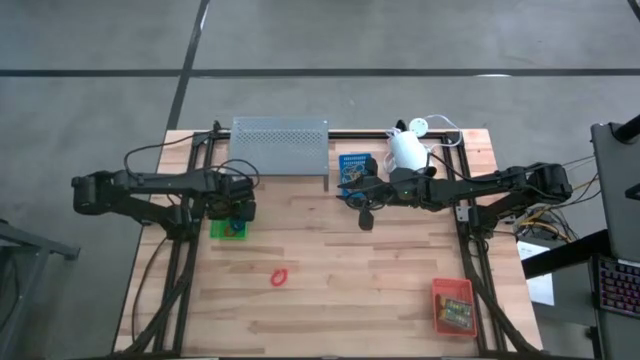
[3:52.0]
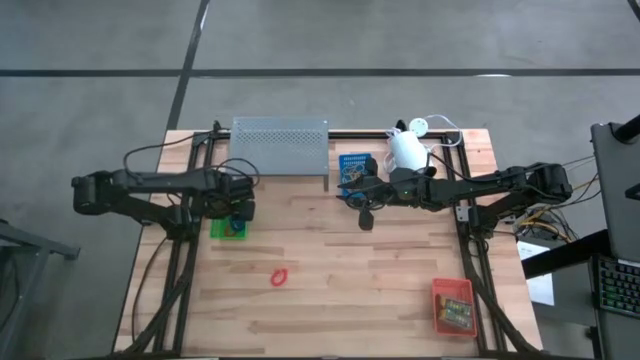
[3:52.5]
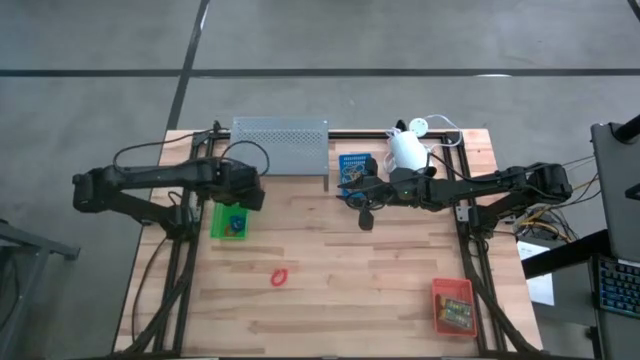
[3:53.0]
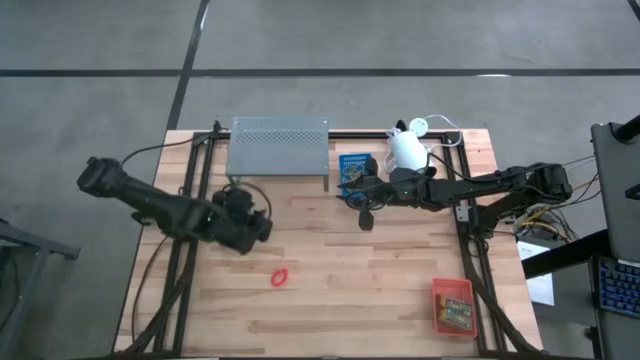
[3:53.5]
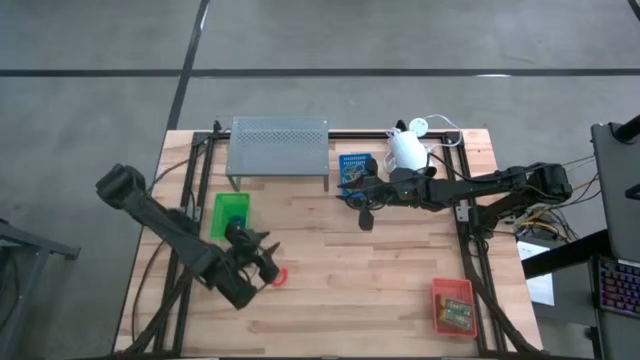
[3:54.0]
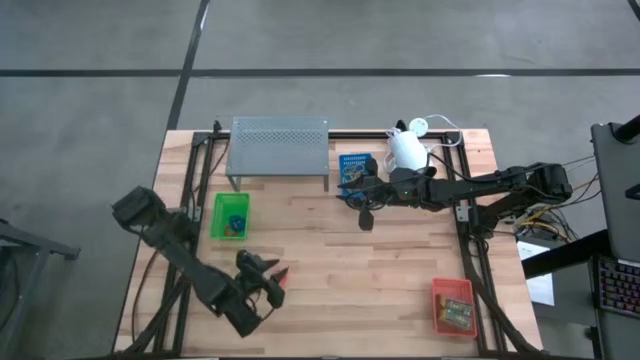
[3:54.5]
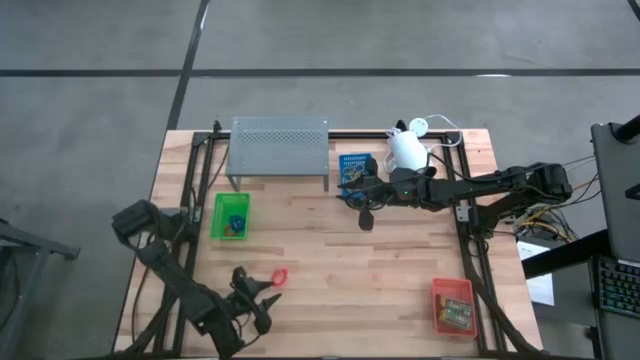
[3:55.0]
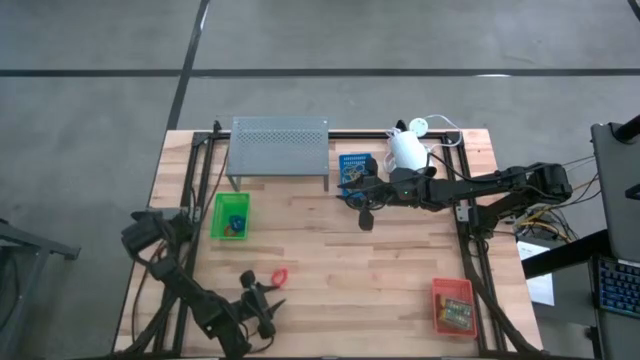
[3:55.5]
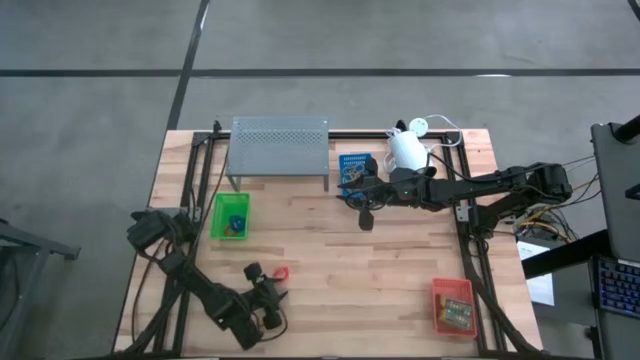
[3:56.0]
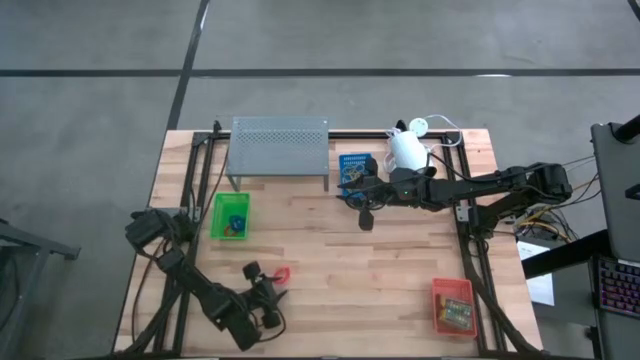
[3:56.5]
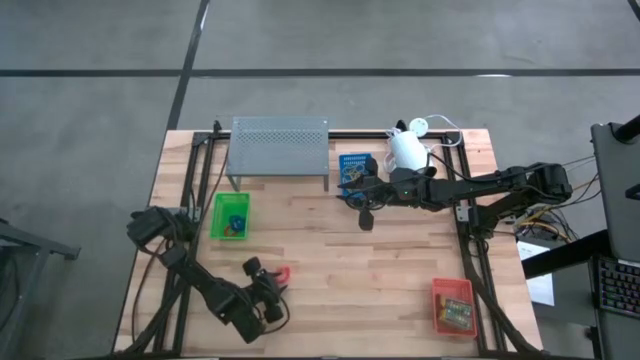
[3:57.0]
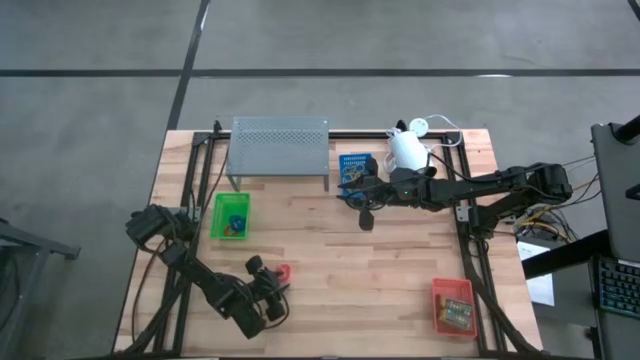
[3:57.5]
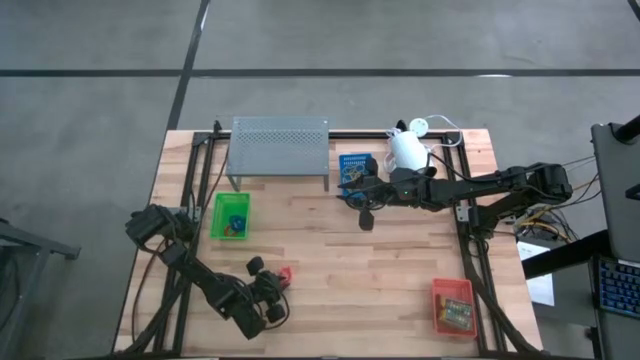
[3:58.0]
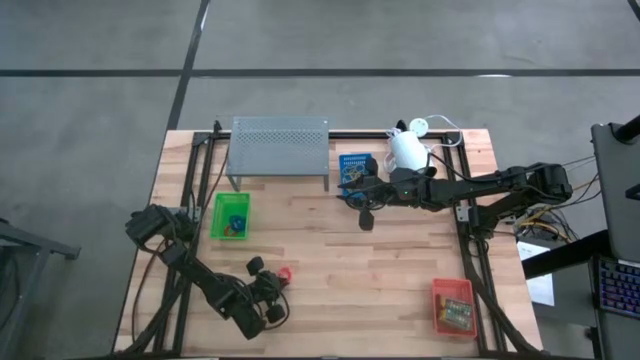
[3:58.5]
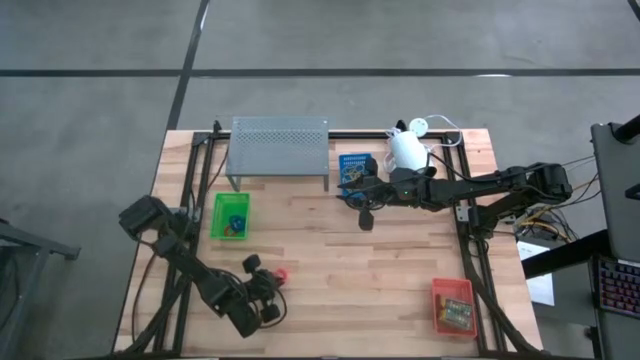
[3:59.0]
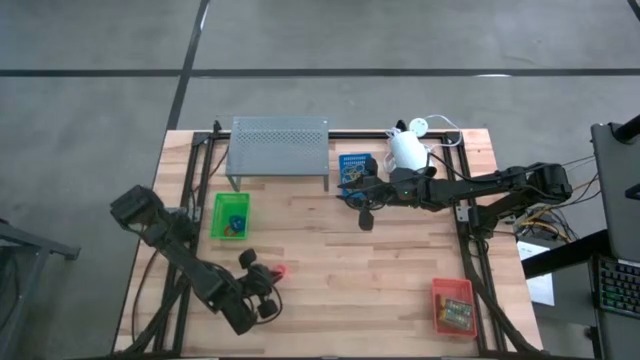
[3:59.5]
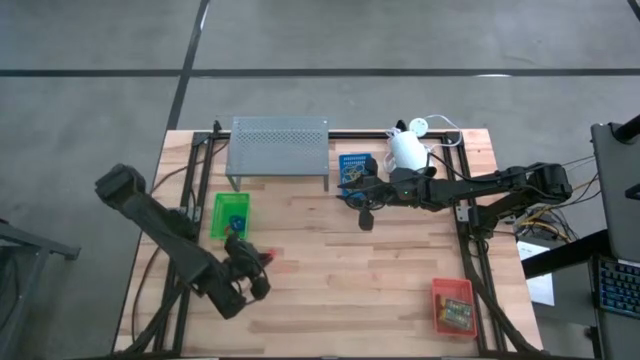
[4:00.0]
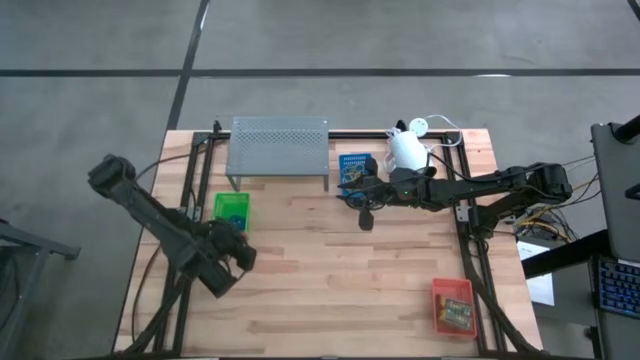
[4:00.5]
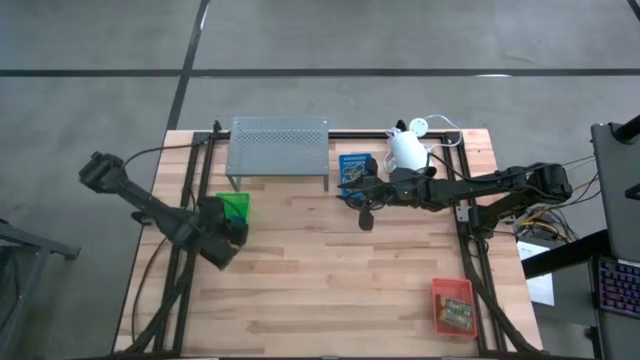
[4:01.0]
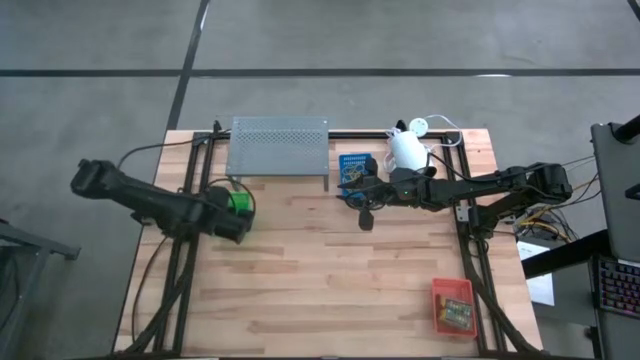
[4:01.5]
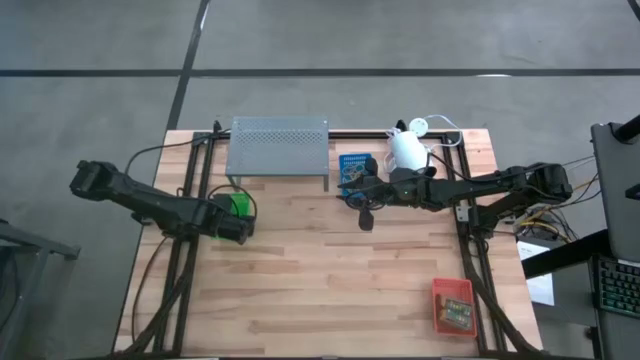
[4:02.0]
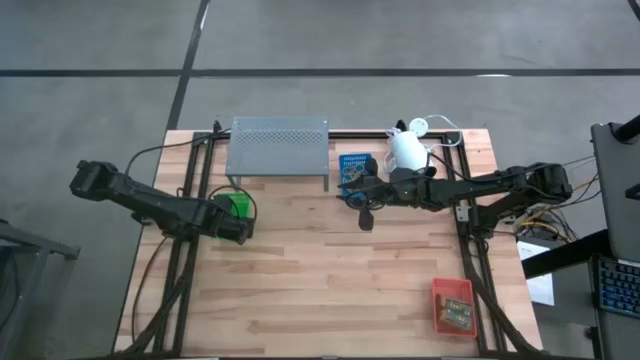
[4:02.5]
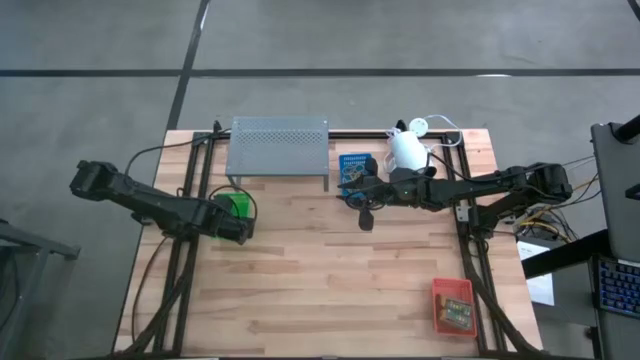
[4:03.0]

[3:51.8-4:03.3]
Task: Pick & Place Office Desk Supplies
Put the orange rubber band into the green bin

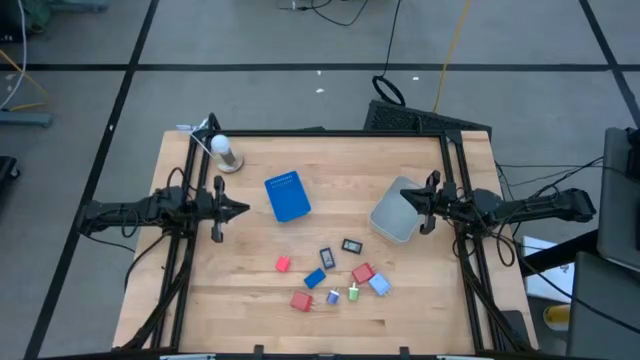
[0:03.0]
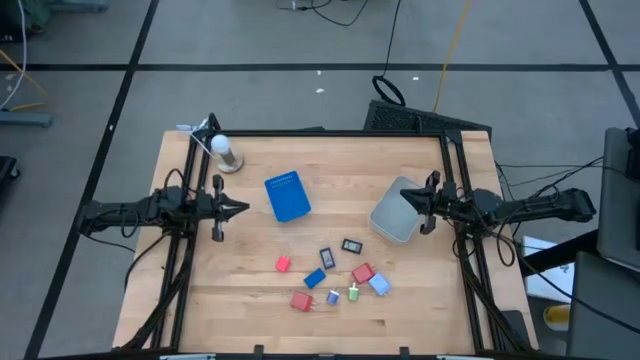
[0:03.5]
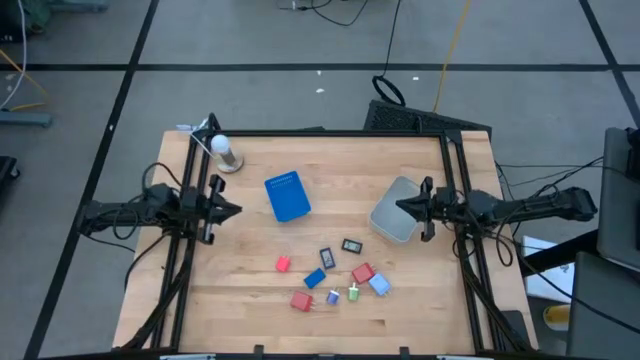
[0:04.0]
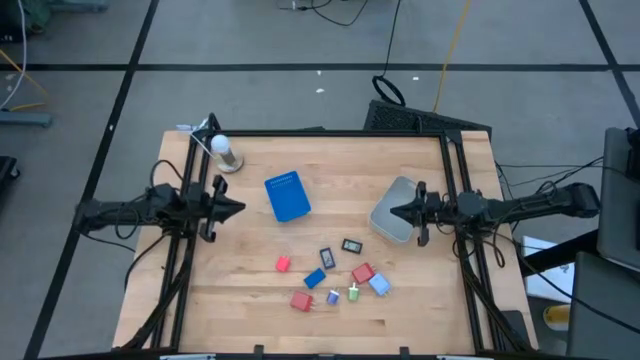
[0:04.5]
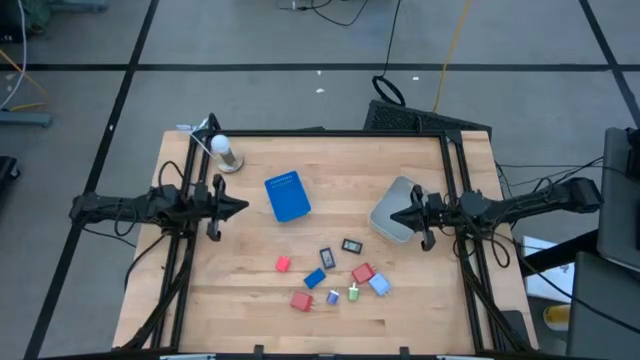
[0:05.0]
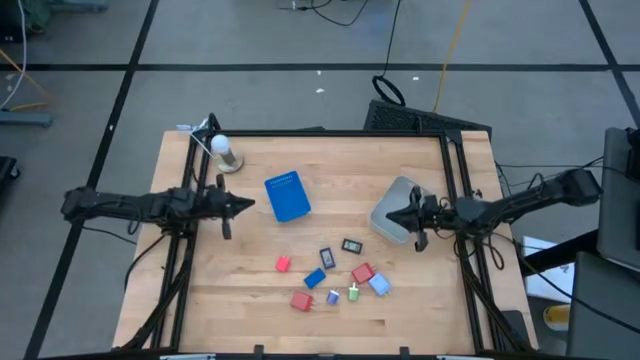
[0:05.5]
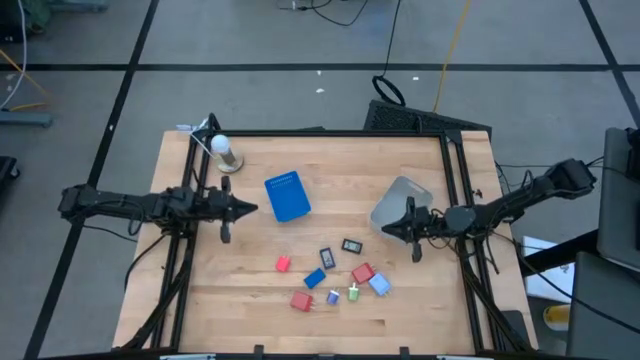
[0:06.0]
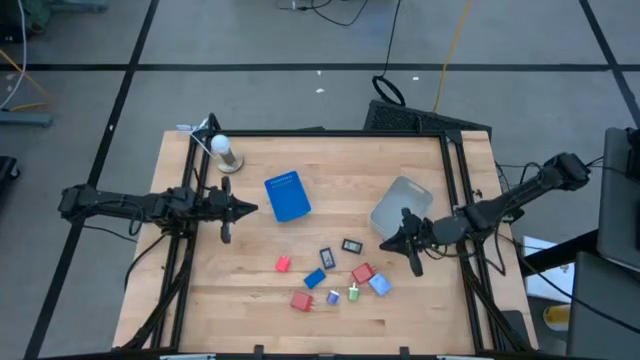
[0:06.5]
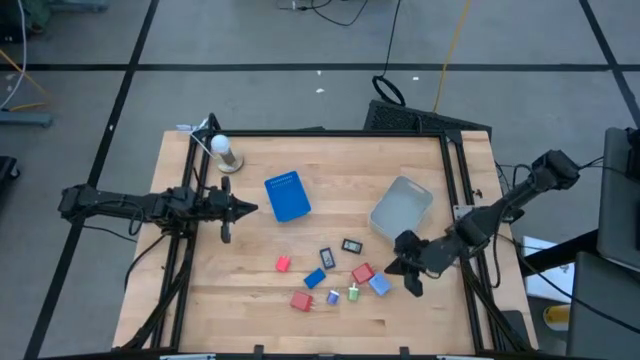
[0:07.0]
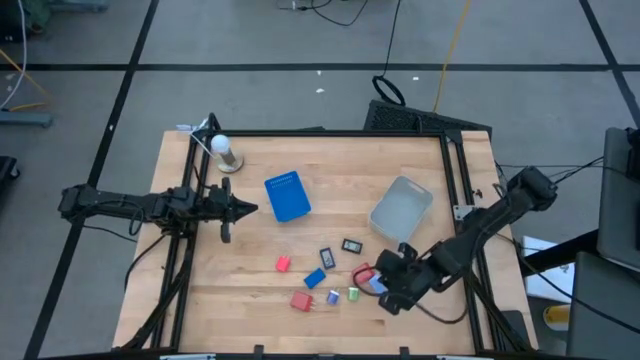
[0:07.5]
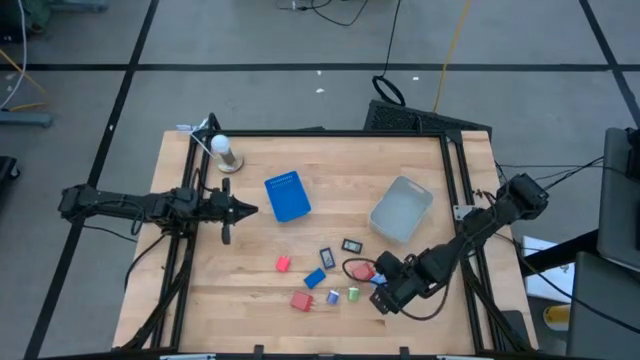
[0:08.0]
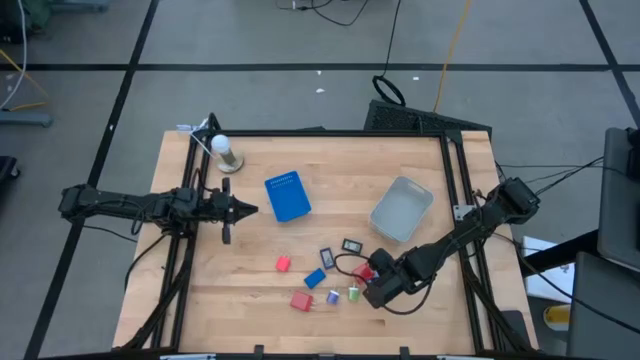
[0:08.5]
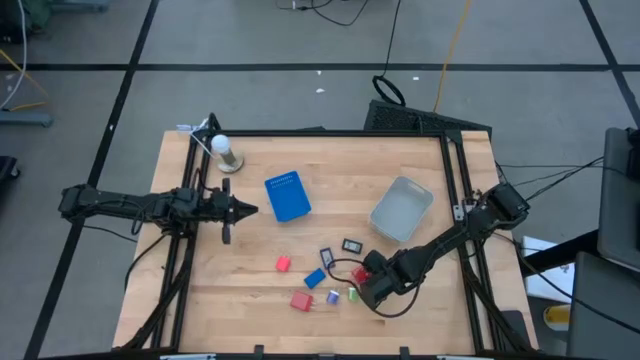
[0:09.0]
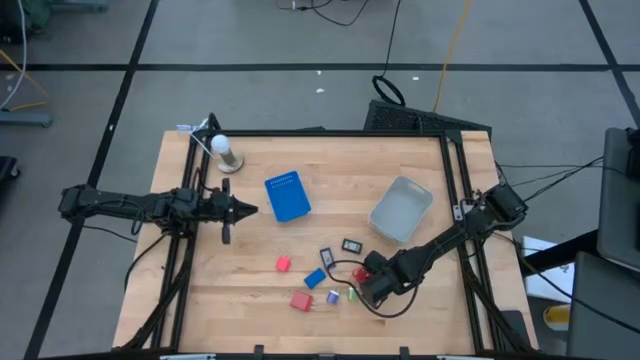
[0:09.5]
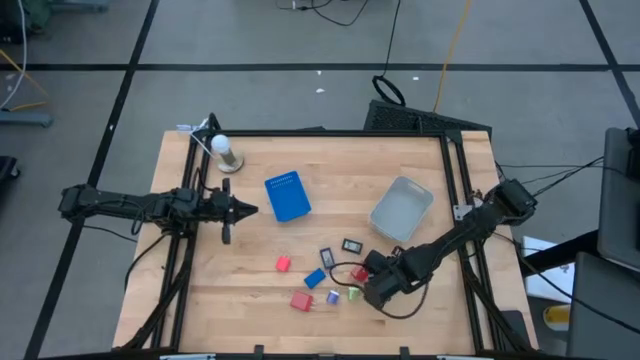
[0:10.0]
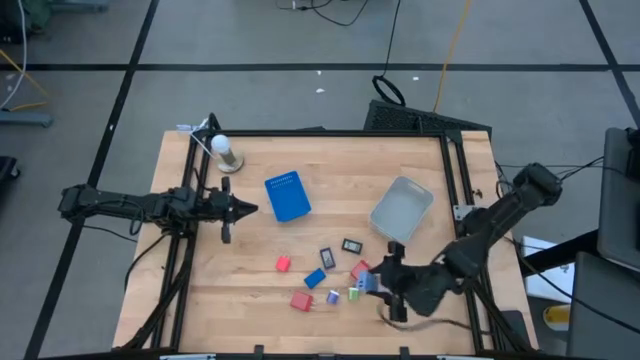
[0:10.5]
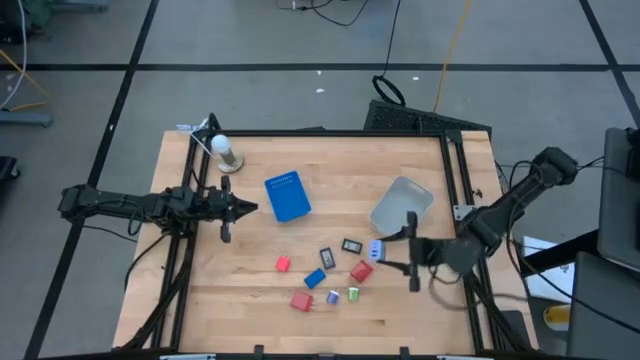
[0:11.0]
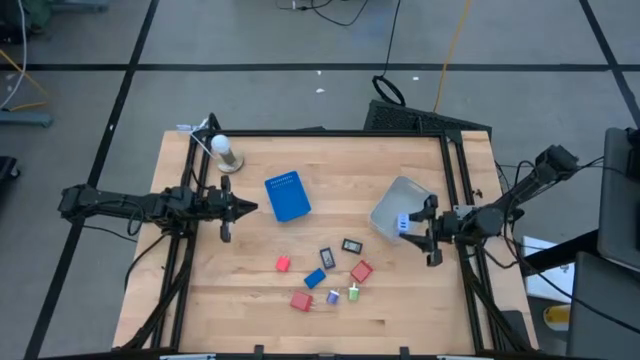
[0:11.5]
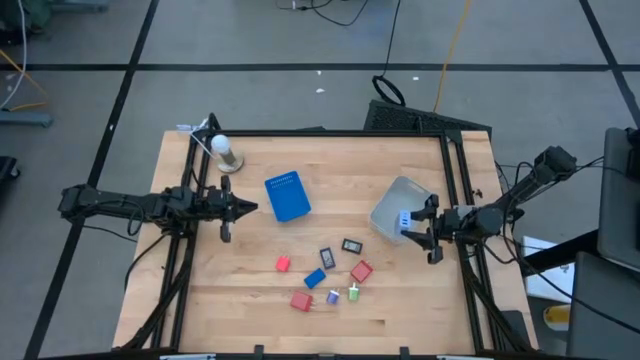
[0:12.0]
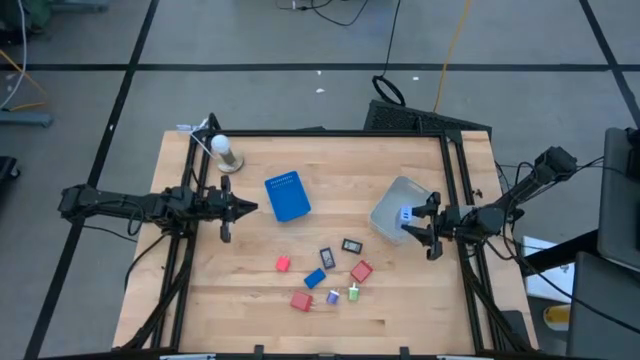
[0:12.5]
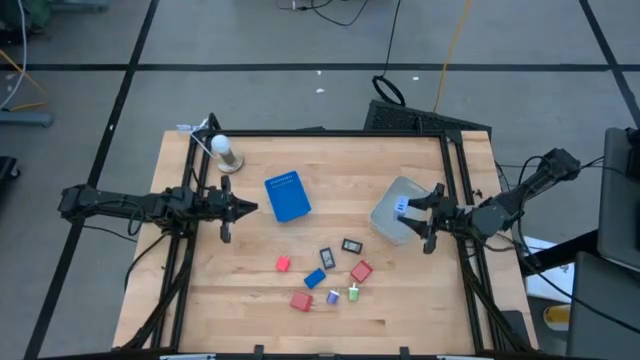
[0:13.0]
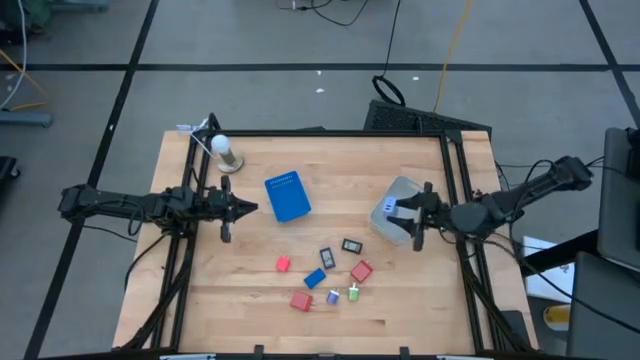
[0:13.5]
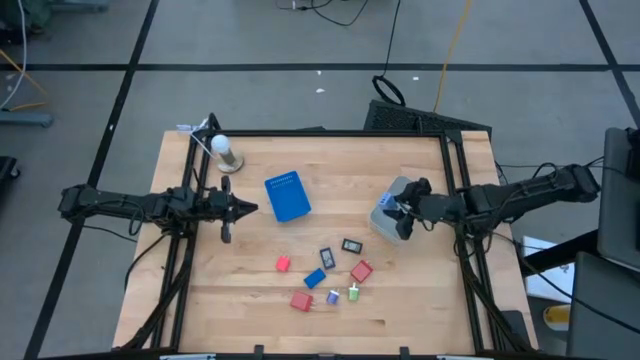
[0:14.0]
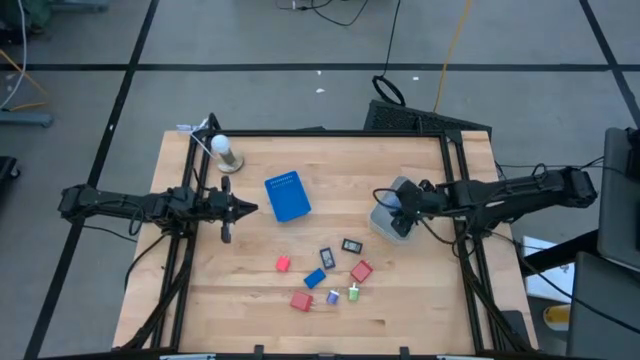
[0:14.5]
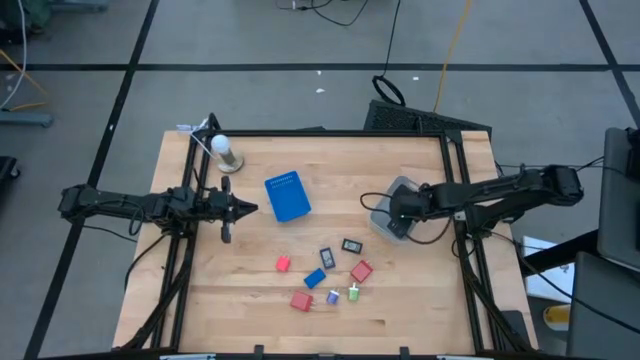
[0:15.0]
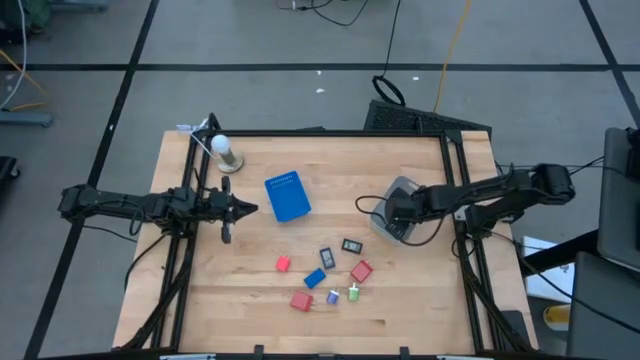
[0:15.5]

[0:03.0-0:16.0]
Task: Pick & Place Office items
Put the light blue charger adapter into the gray bin
